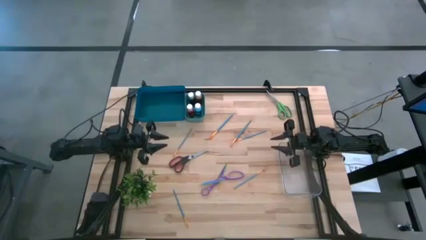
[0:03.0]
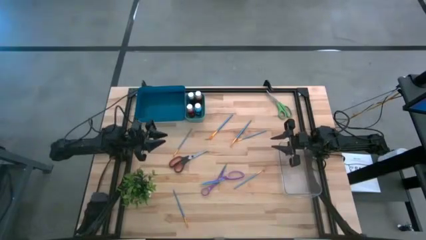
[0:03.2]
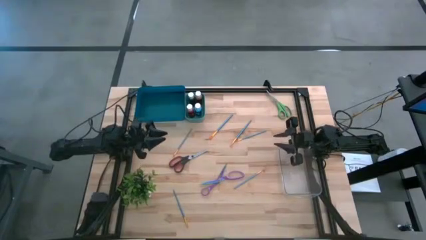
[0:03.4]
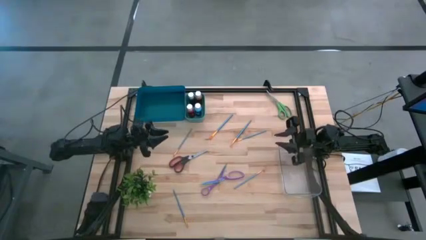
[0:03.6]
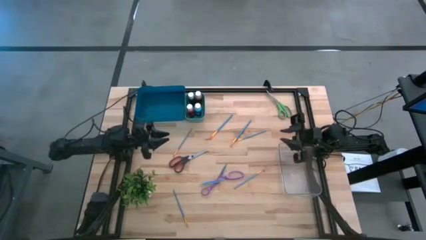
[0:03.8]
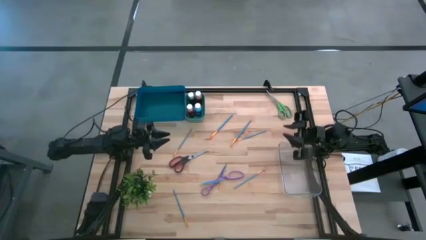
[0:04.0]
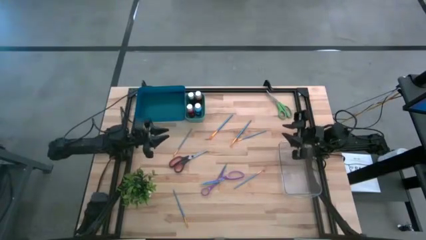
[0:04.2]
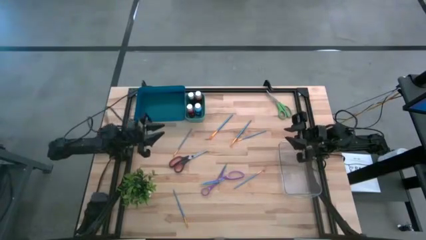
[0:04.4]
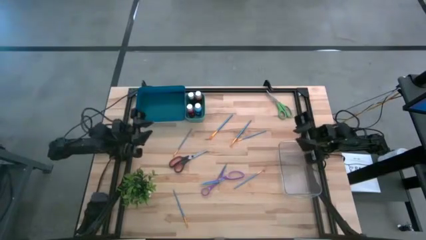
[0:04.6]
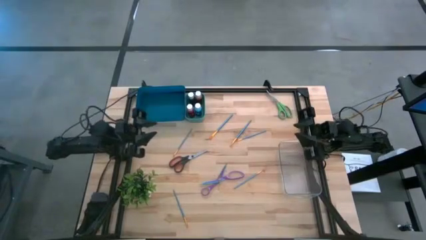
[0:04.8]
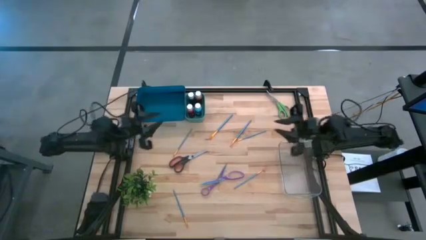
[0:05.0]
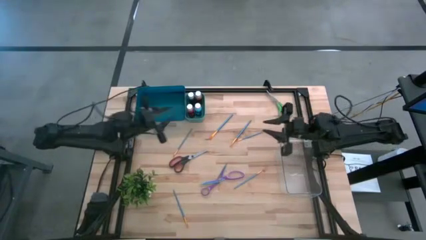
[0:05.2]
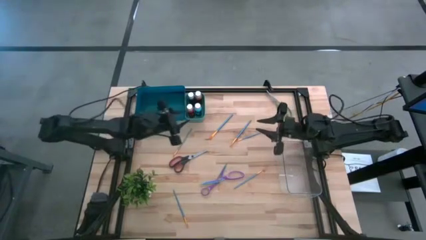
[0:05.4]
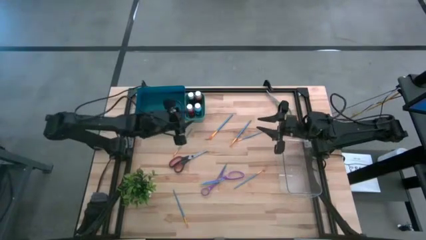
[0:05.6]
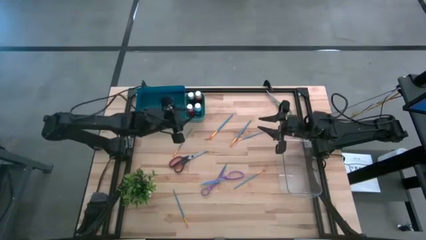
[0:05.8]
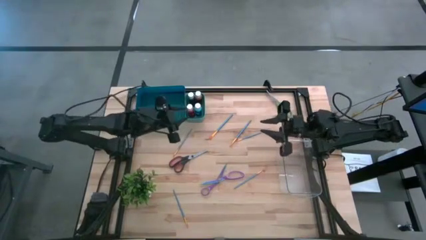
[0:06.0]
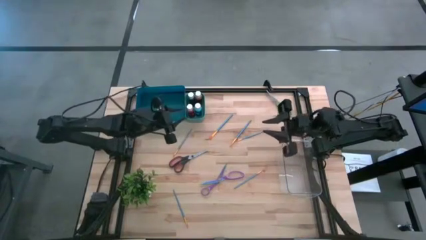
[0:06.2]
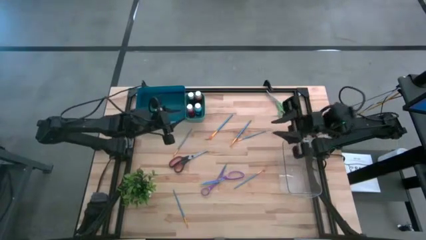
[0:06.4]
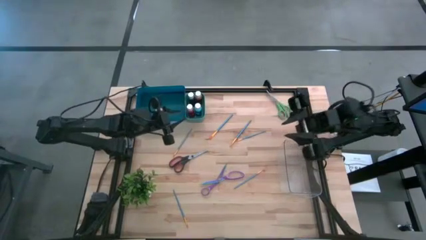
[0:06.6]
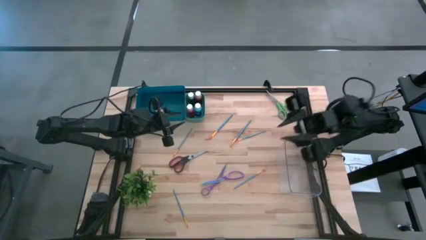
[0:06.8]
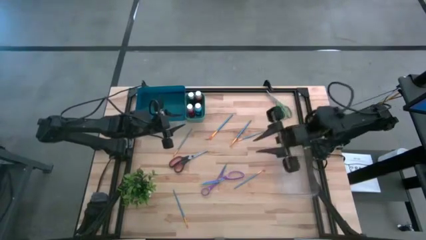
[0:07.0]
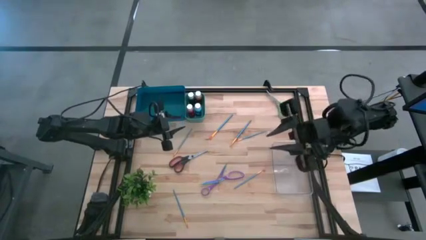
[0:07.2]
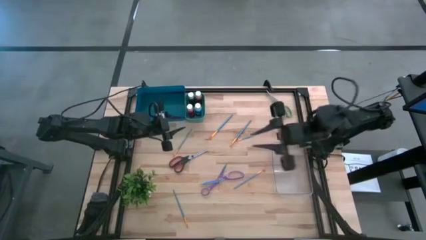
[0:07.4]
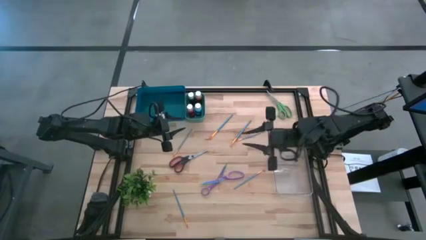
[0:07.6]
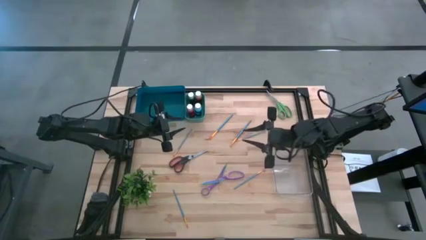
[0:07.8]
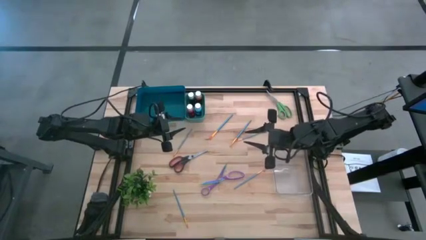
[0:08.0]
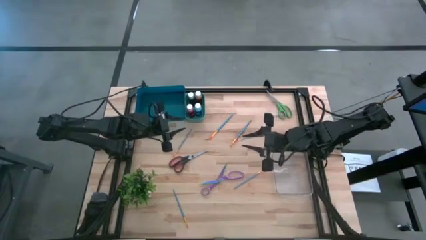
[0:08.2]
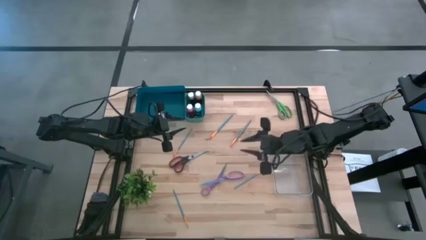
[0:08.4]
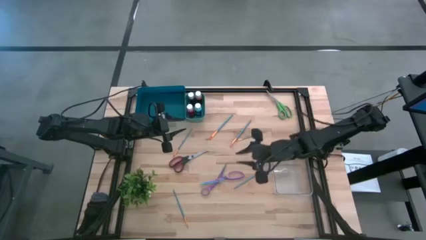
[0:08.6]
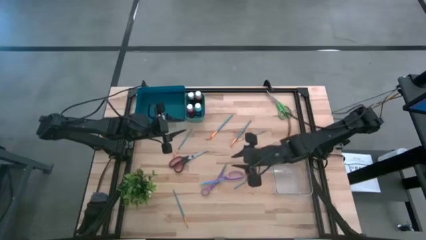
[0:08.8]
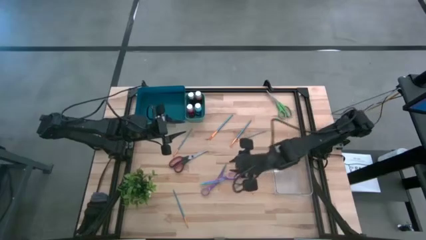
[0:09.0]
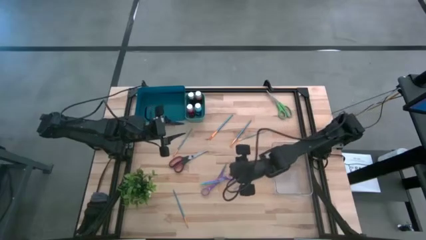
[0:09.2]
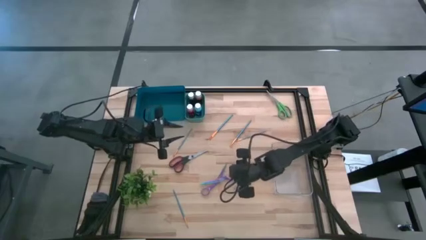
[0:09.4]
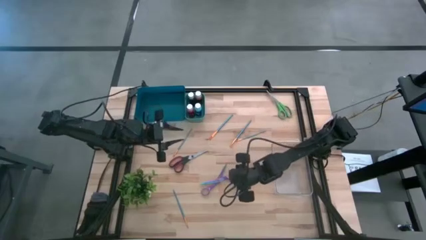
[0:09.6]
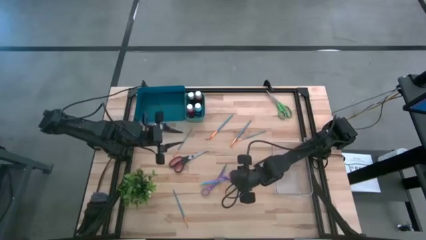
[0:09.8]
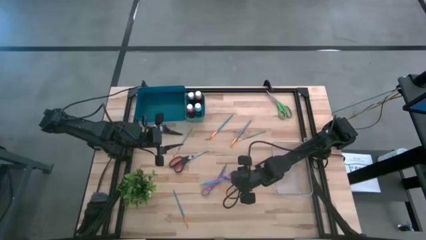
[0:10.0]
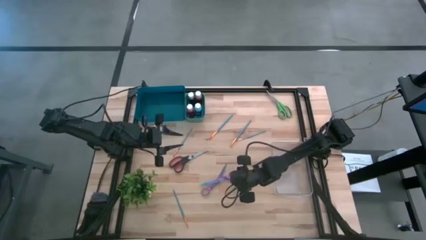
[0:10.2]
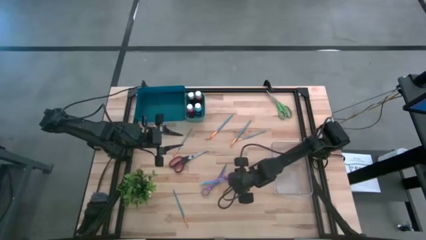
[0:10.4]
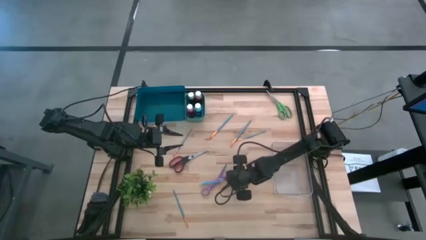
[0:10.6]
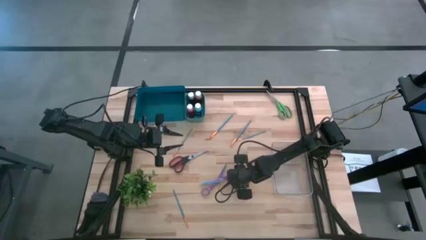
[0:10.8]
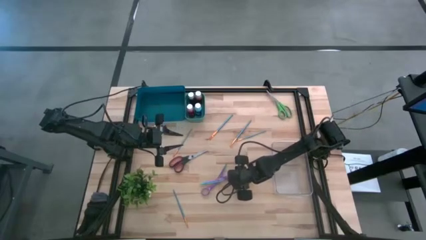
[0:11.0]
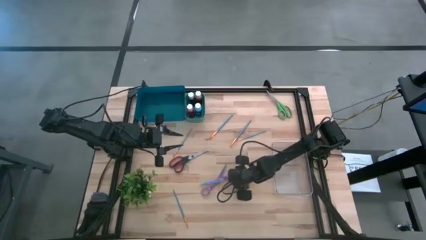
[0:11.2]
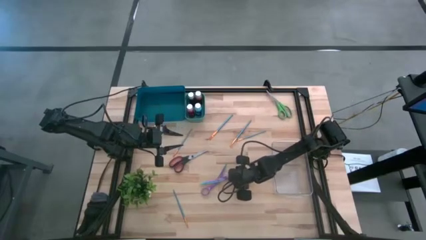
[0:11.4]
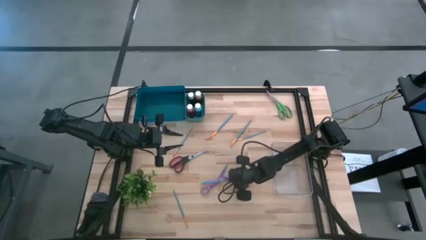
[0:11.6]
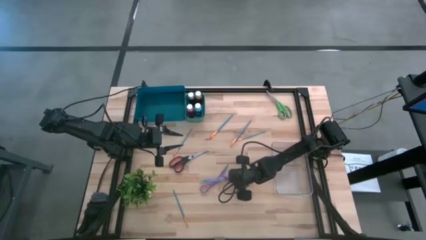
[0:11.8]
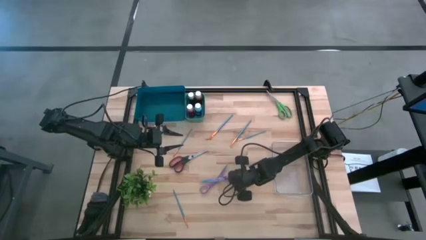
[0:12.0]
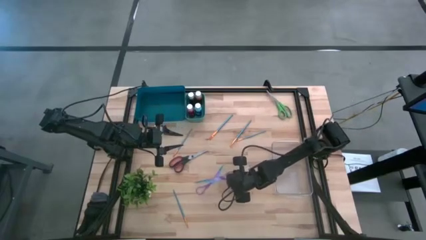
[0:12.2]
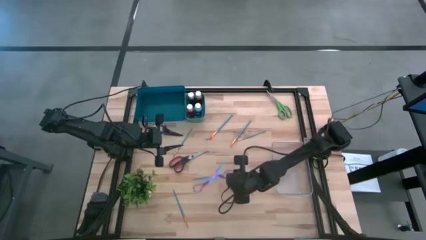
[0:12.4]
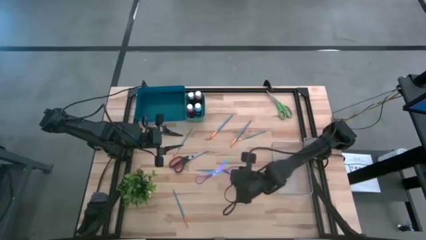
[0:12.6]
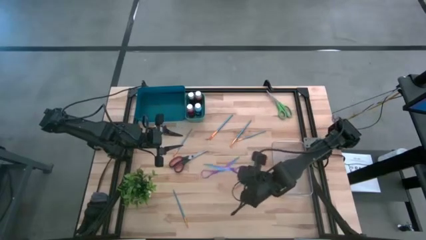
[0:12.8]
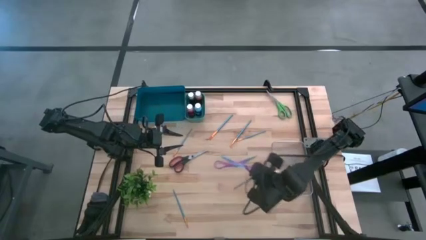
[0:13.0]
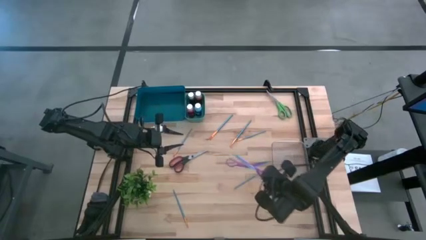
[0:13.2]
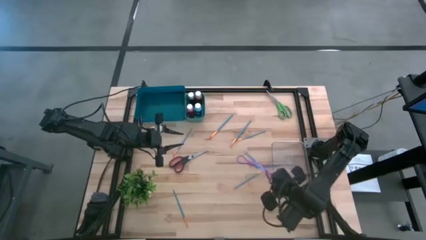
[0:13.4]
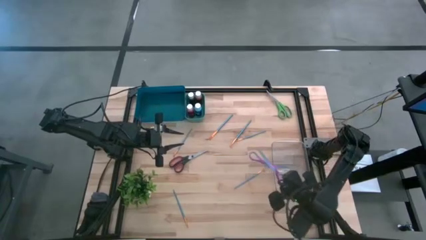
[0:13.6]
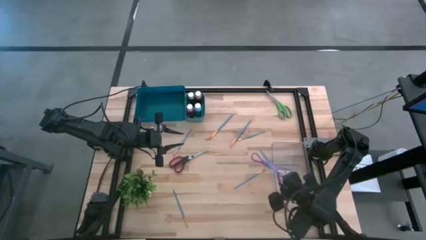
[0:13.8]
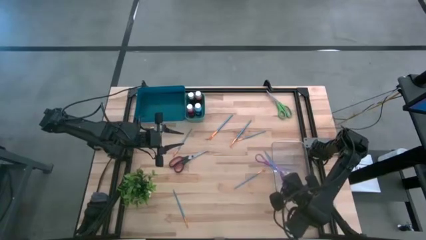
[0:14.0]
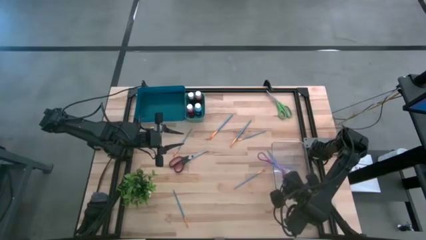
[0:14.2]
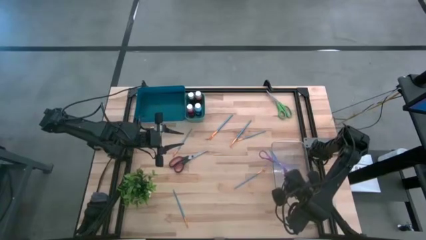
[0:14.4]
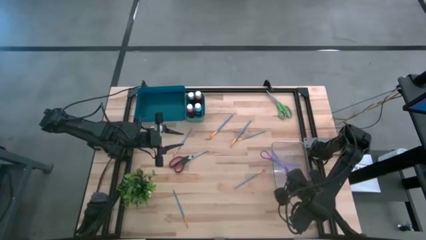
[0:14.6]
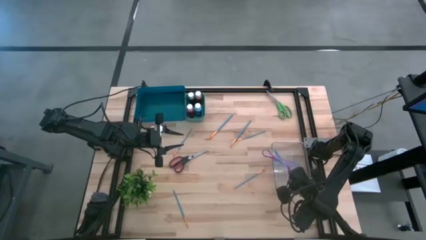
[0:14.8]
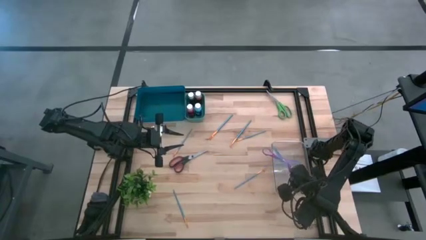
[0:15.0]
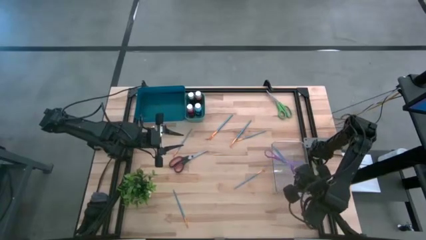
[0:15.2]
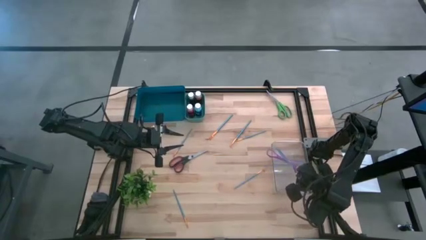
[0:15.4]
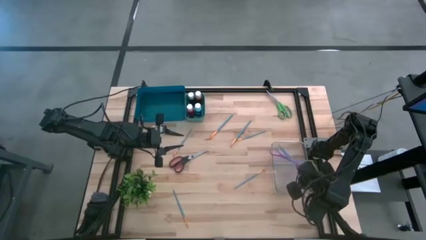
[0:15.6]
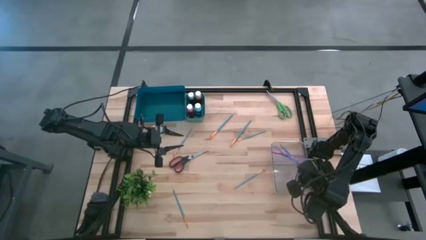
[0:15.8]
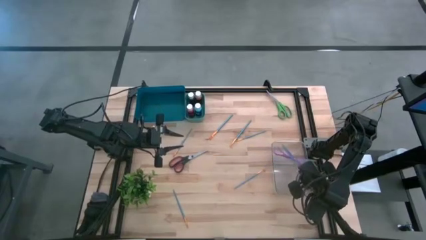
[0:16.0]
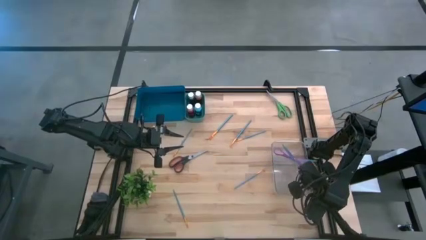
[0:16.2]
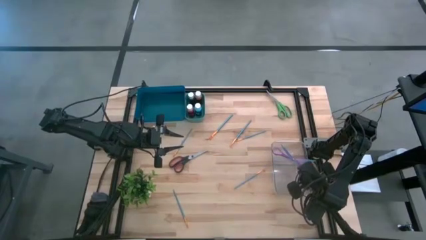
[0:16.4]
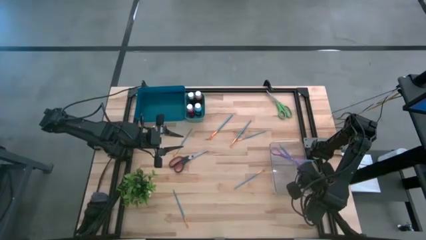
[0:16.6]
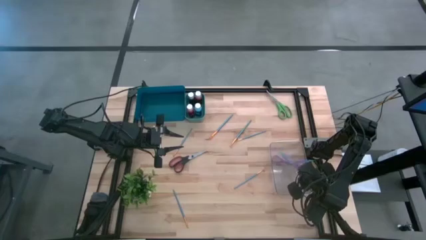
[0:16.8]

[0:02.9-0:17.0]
Task: Pick & Place Paint Supplies
Put the violet scissors into the transparent bin

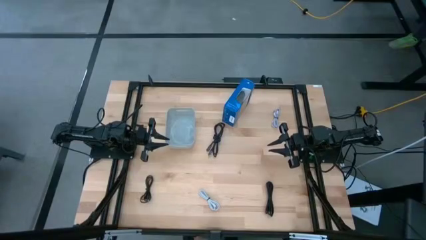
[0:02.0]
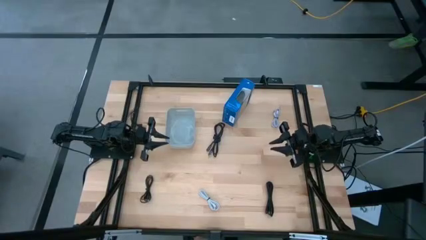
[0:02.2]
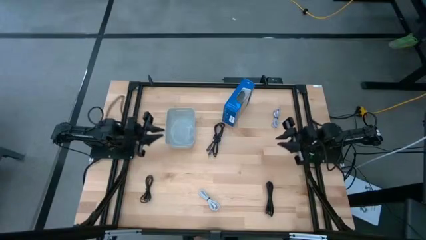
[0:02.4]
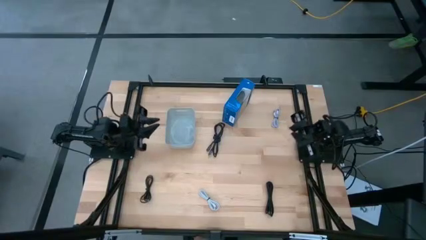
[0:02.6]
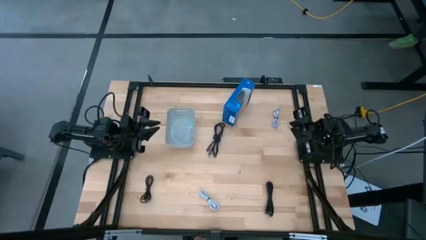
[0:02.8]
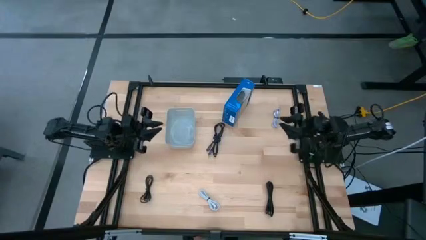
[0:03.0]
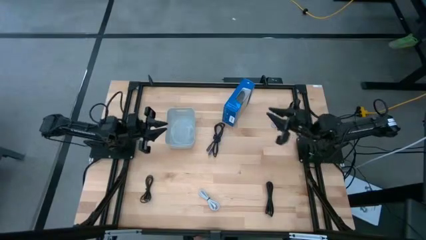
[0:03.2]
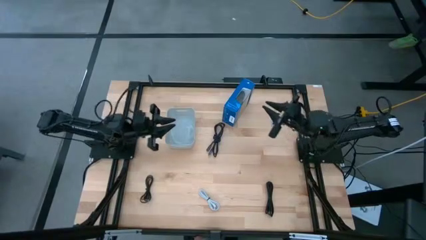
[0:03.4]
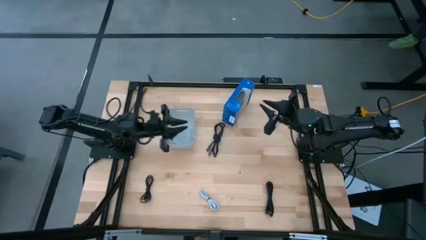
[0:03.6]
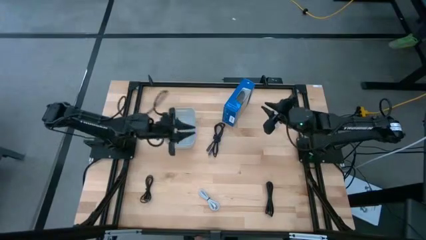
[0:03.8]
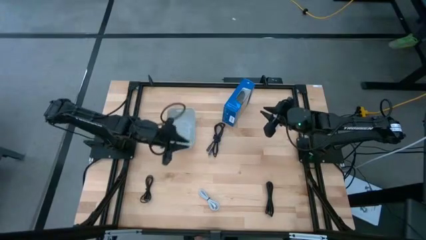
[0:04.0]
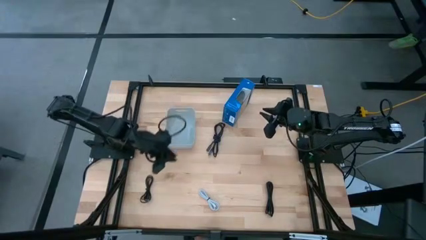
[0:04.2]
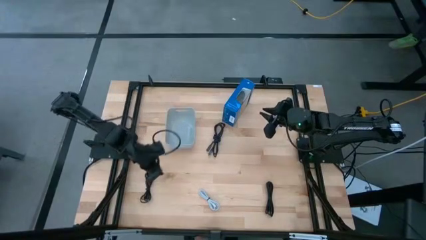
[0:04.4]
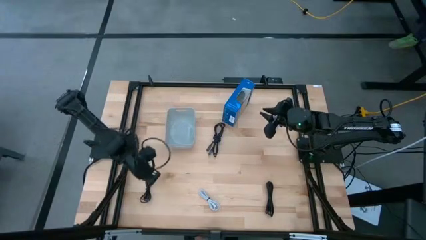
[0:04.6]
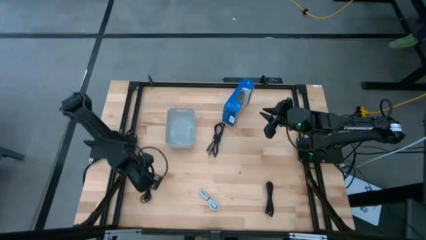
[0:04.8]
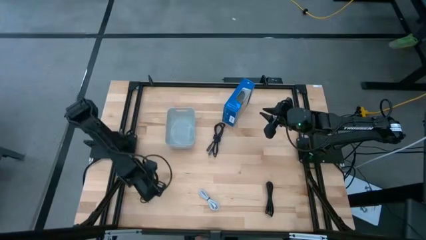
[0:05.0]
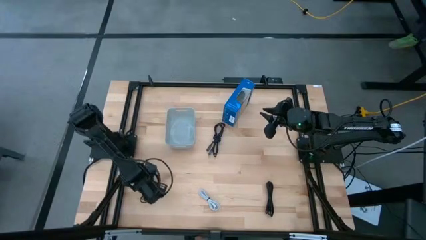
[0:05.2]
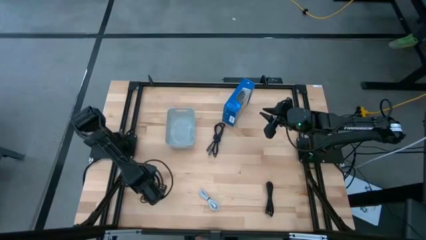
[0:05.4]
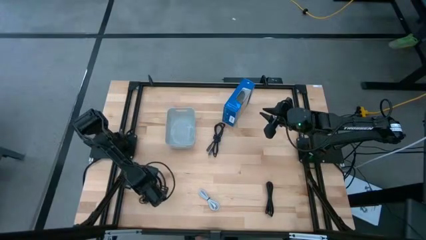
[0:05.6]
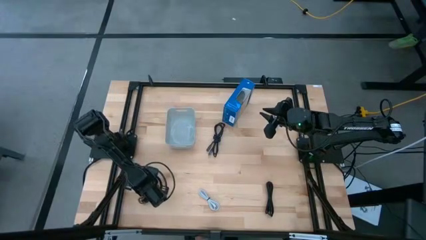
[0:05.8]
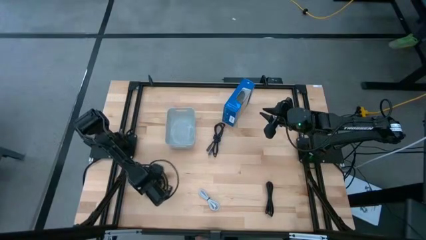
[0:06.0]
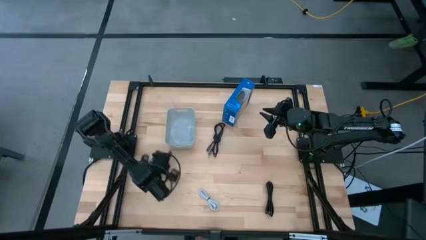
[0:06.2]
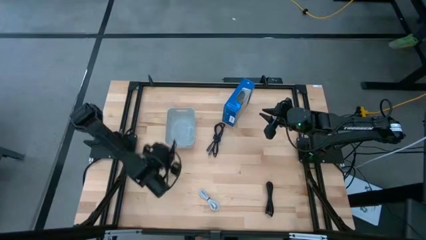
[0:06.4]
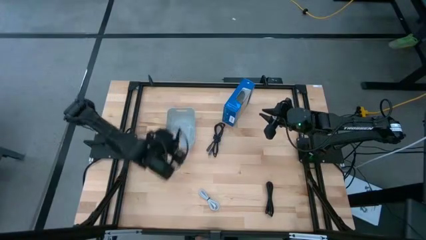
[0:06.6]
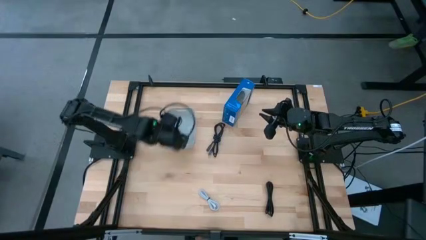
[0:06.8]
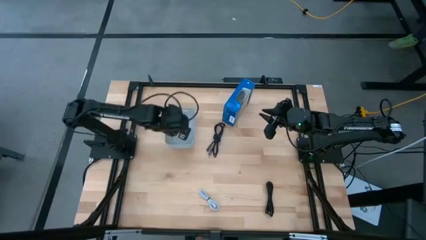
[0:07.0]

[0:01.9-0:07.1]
Task: Pick and place USB-C Cables
Put the bottom left black charger cable into the white bin
